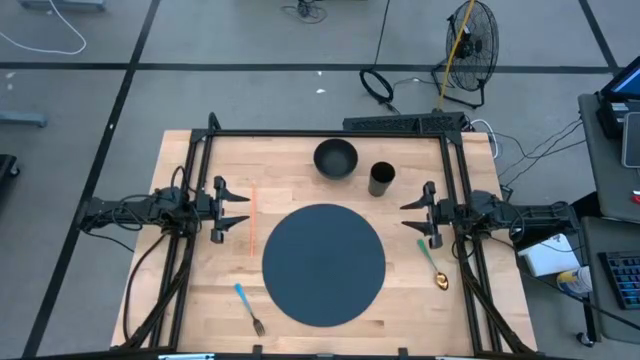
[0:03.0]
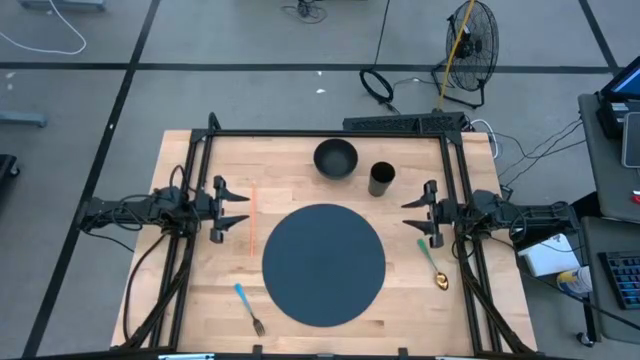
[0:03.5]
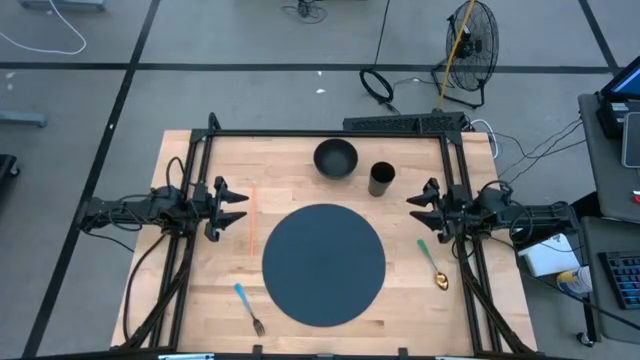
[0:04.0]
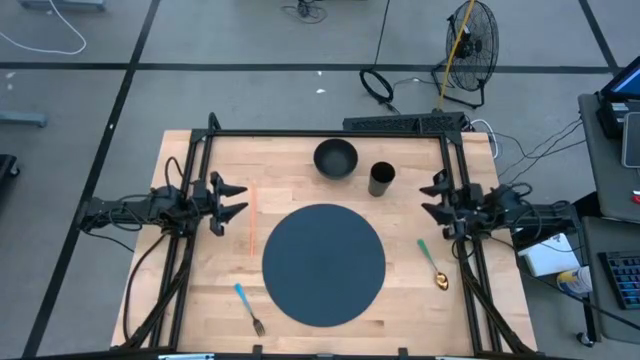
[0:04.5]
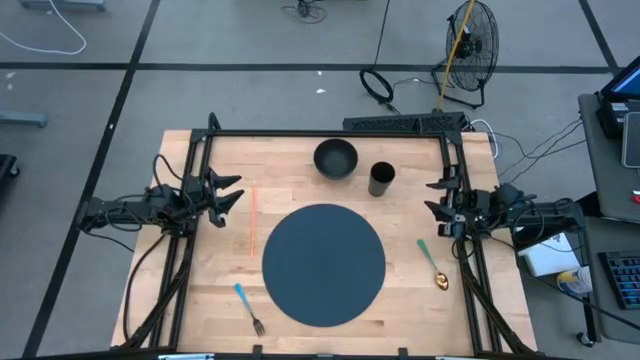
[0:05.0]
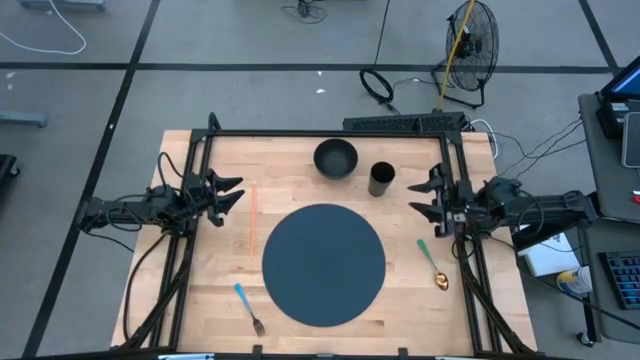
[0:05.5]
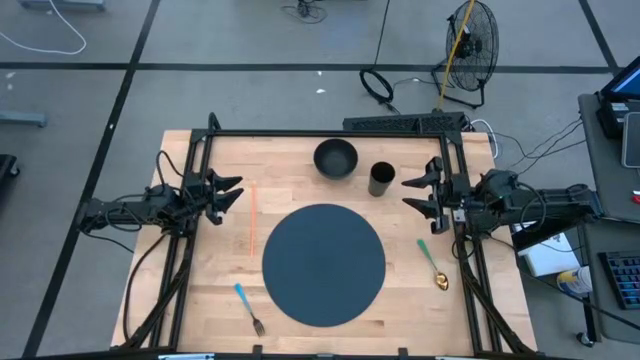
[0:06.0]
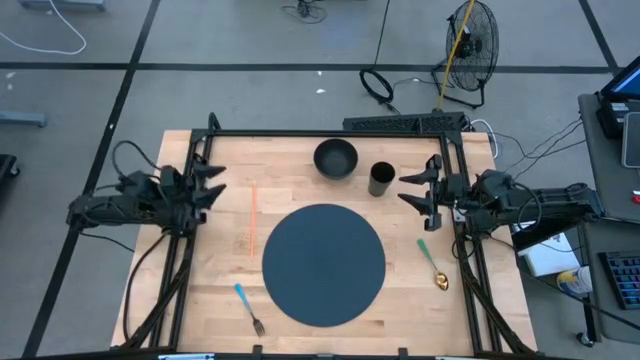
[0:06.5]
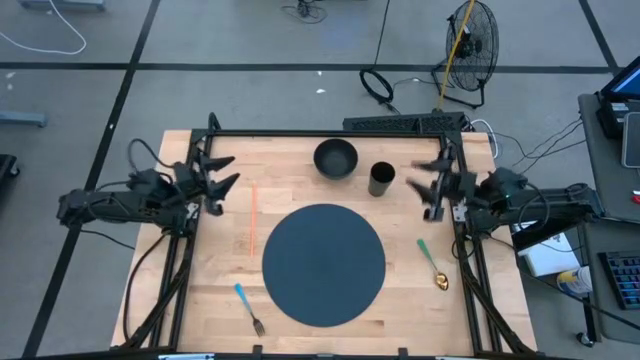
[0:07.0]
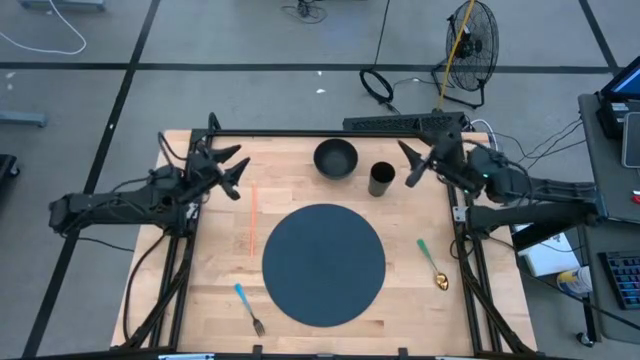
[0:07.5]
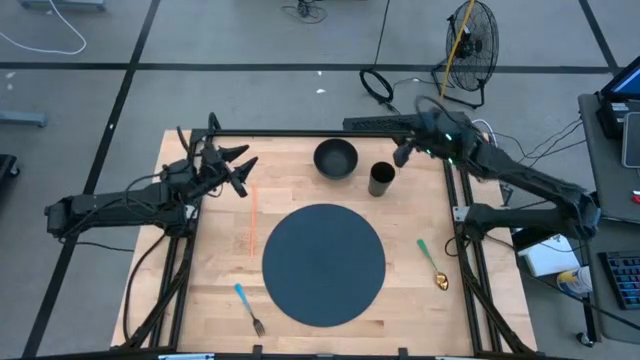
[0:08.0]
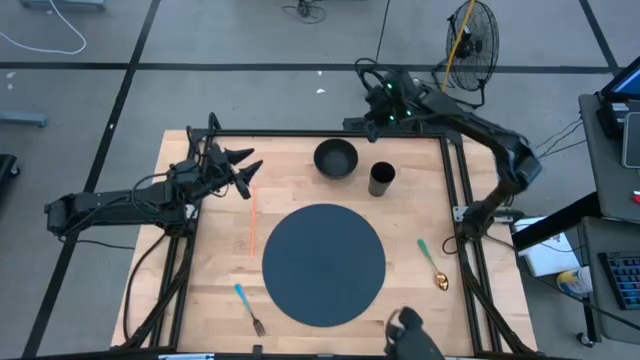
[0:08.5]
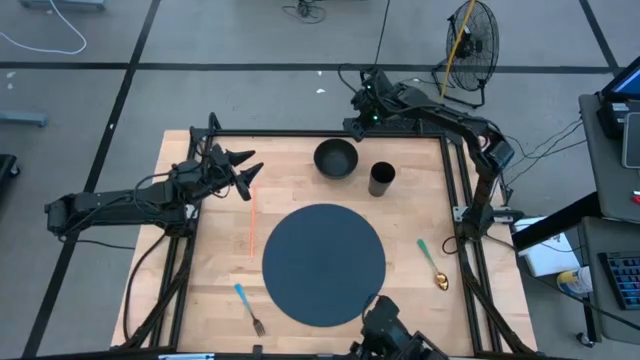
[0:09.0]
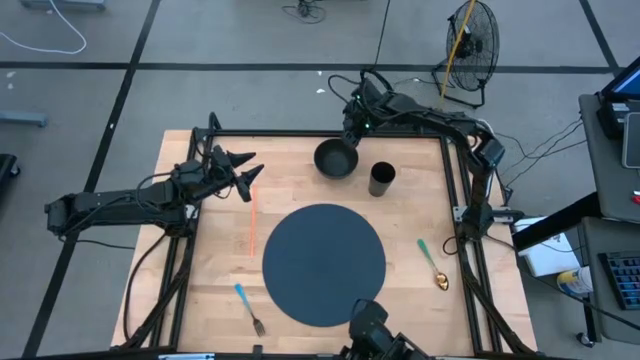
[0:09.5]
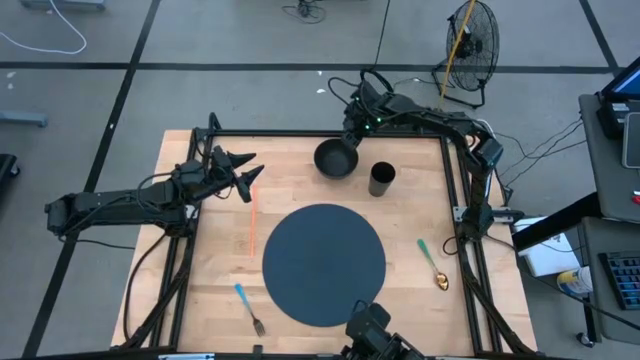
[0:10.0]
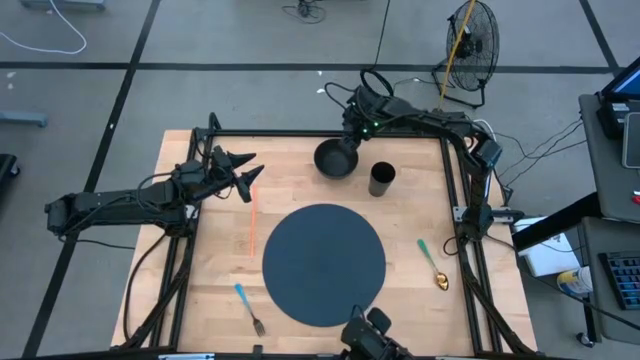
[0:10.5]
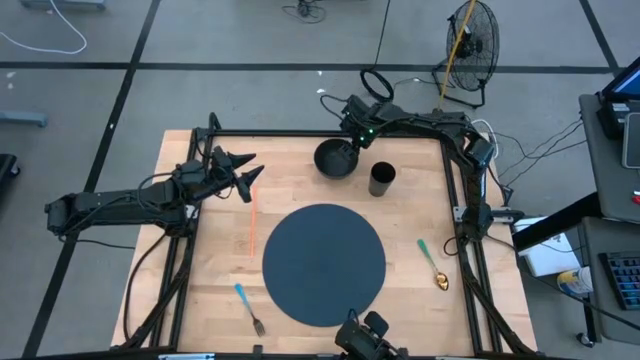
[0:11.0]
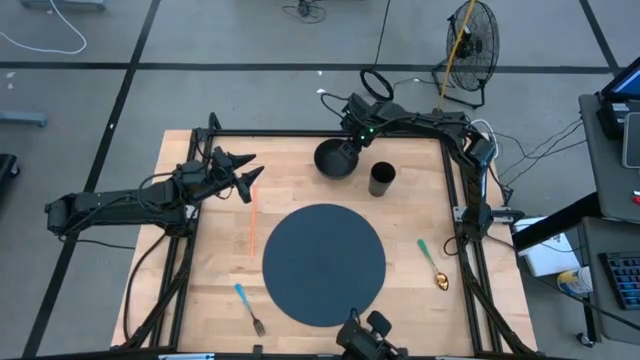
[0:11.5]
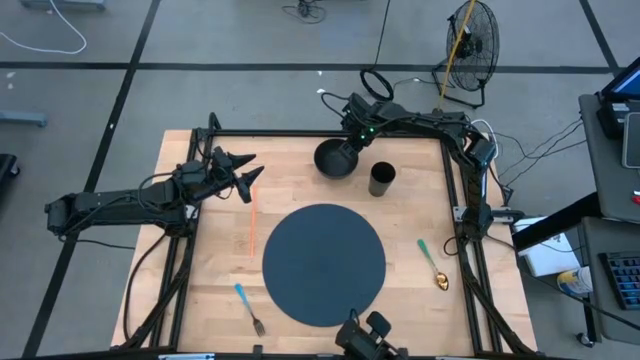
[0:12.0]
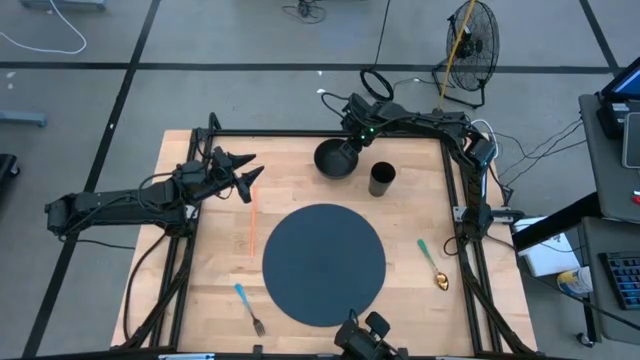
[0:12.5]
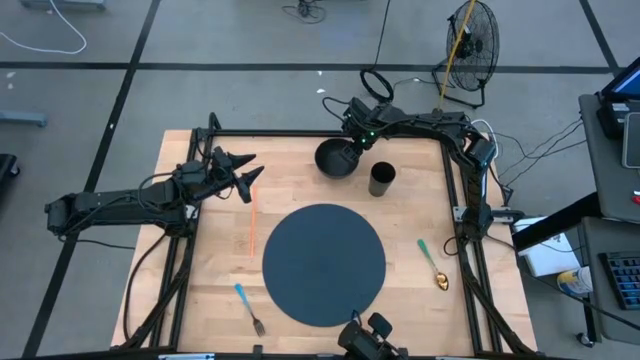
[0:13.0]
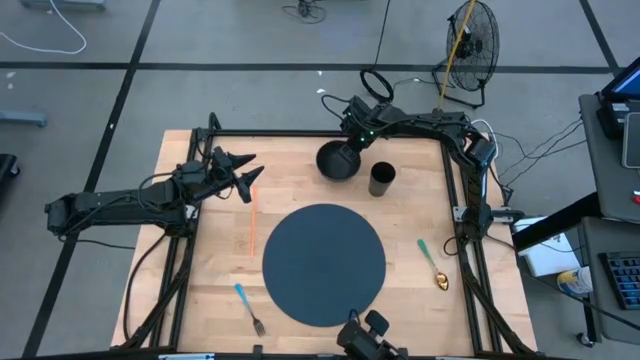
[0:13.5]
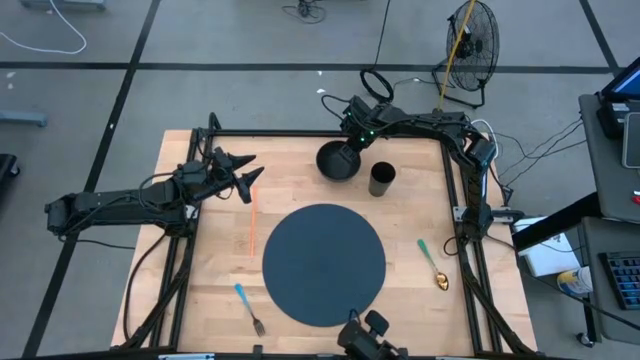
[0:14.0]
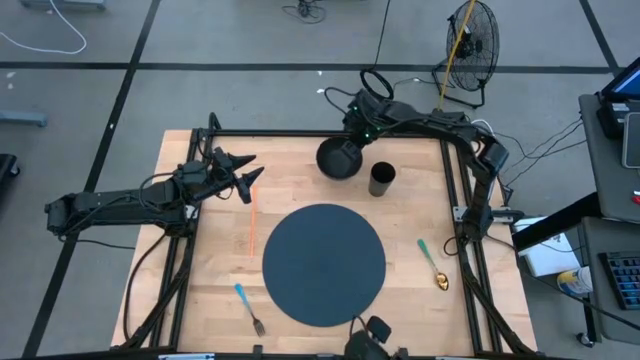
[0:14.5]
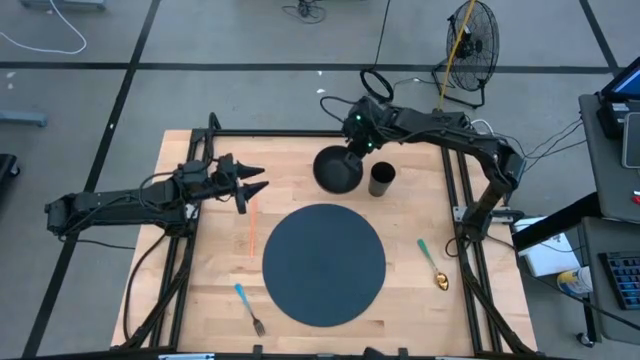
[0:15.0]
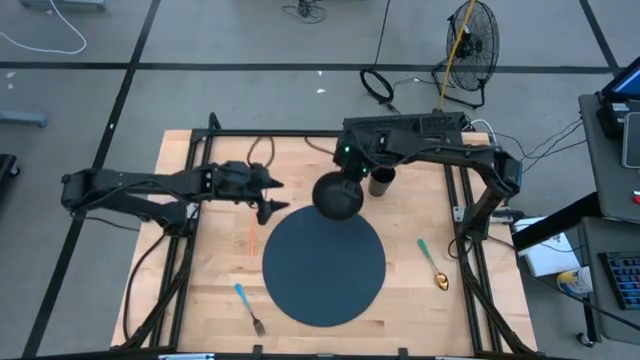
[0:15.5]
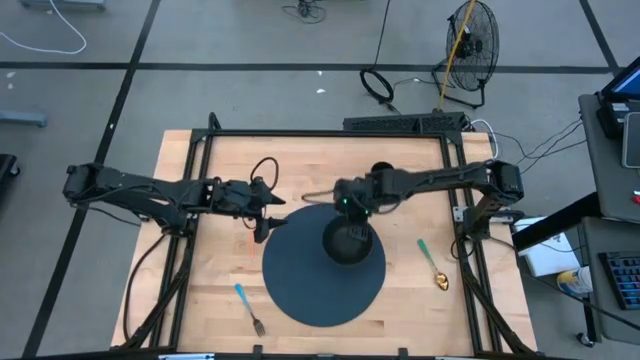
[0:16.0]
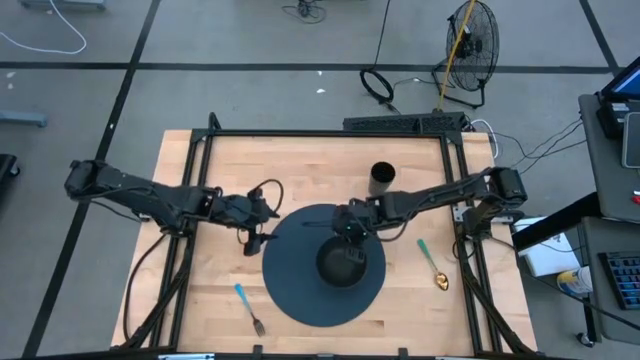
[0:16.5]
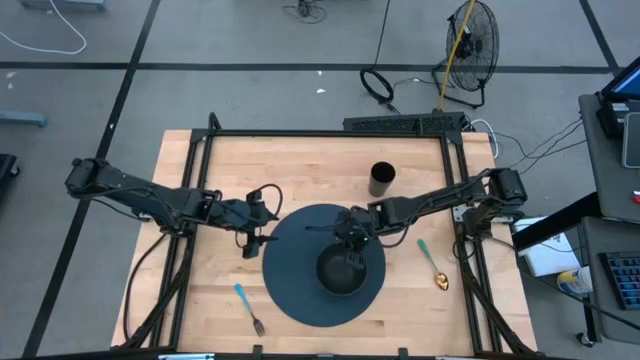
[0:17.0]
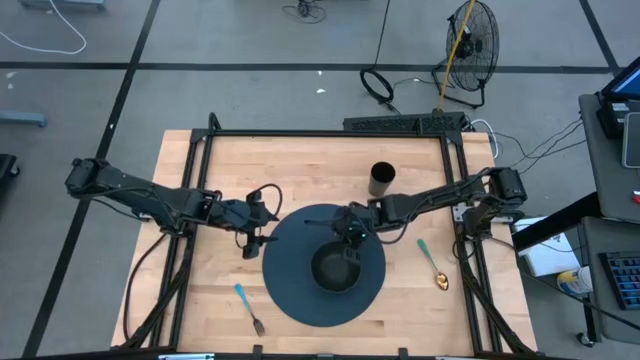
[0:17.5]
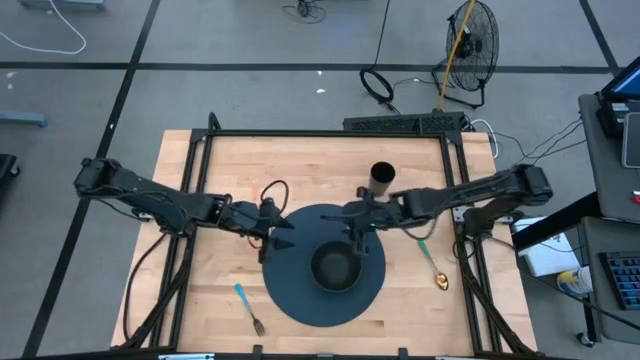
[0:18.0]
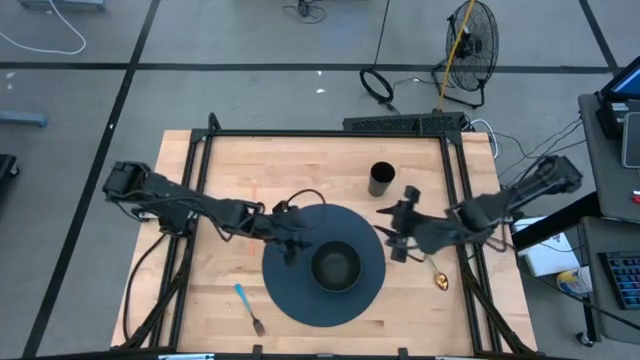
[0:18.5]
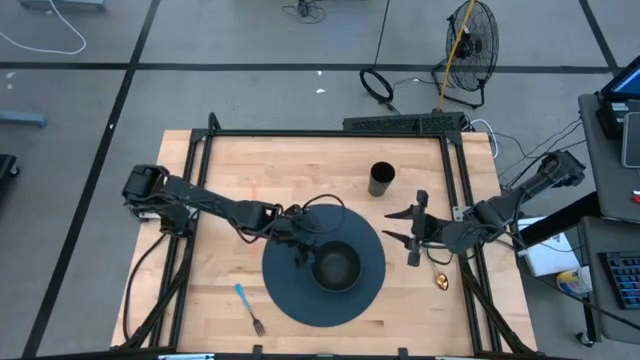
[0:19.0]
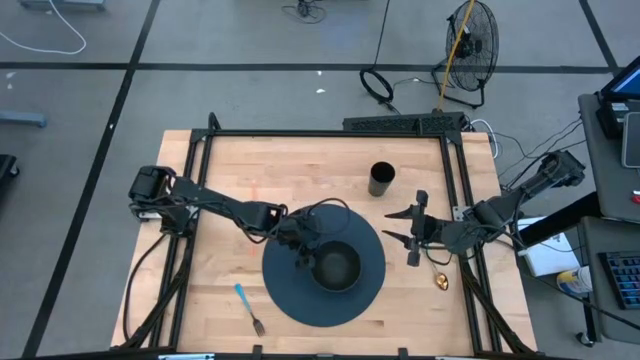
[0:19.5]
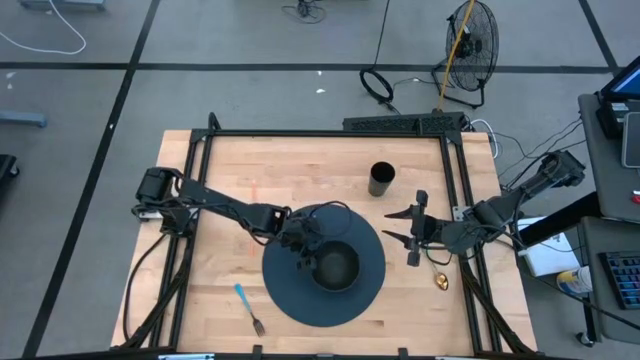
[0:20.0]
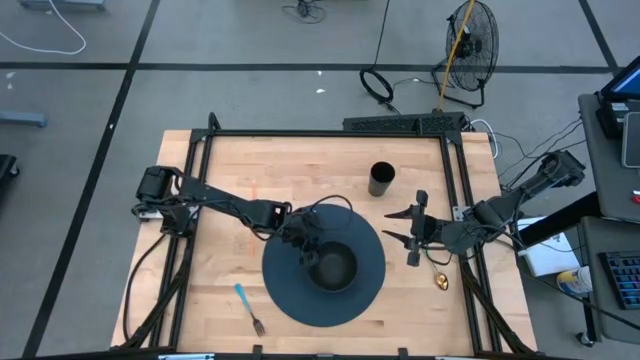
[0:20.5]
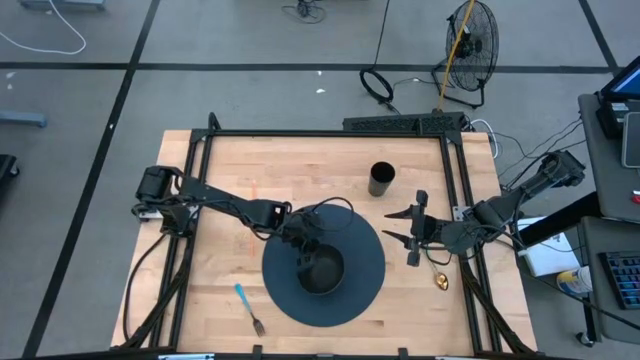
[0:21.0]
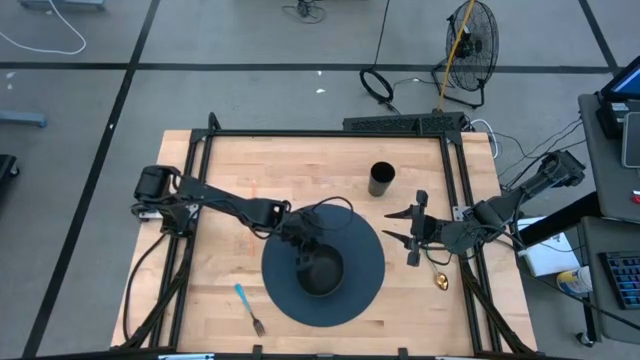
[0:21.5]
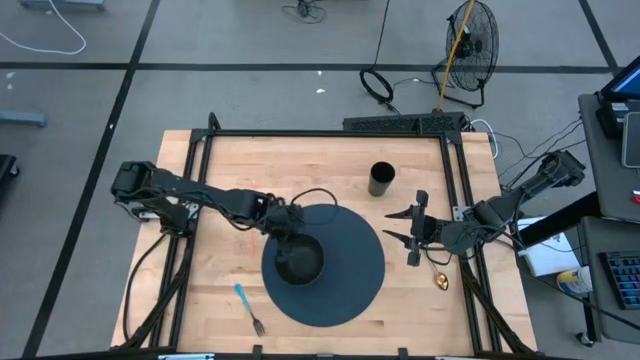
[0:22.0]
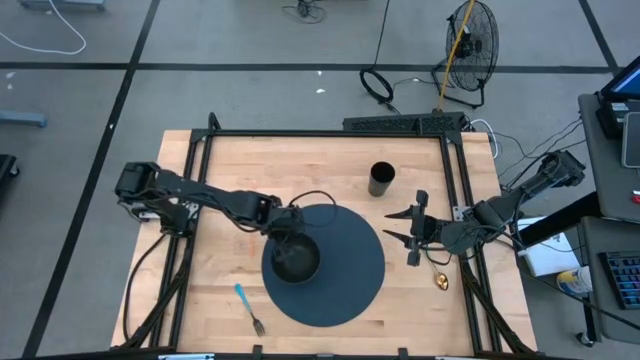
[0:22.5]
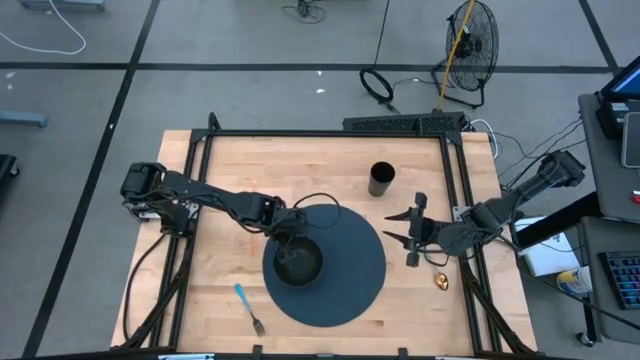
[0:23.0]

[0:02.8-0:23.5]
Task: Pick & Place Utensil
Put the black bowl on the left of the blue mat
